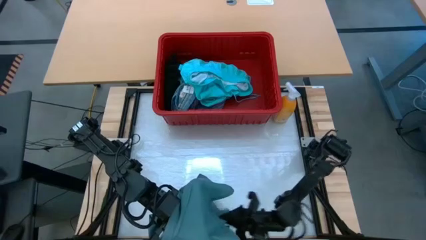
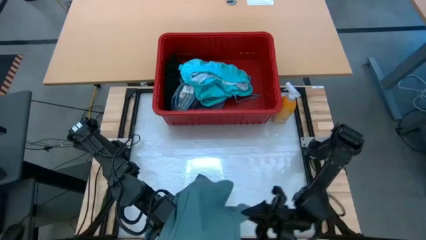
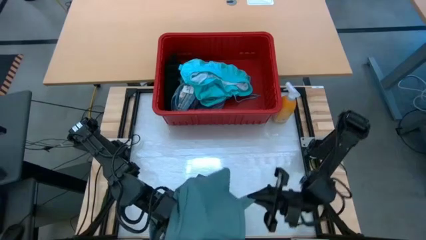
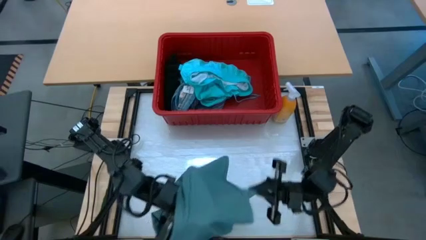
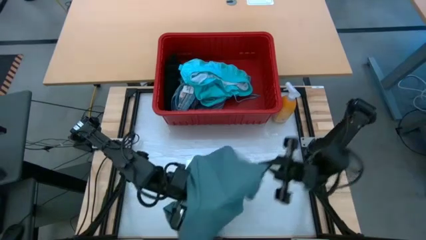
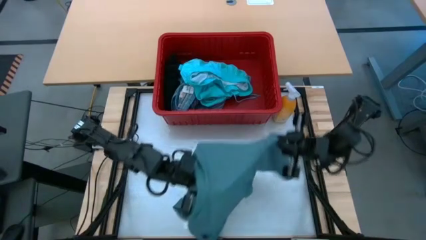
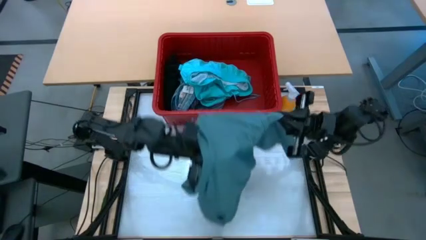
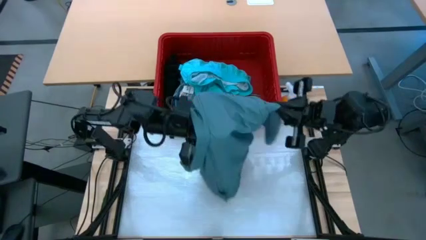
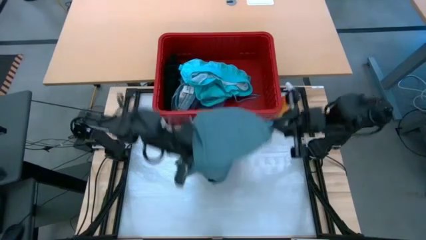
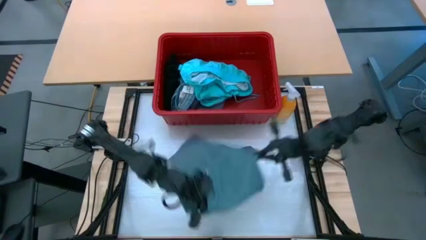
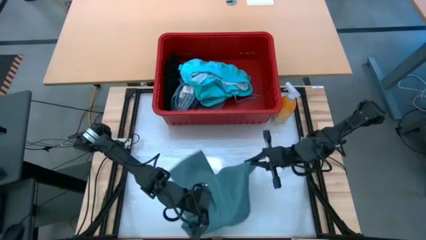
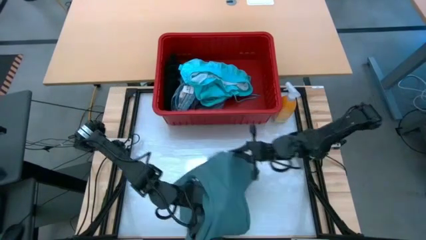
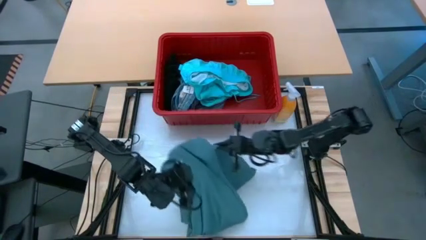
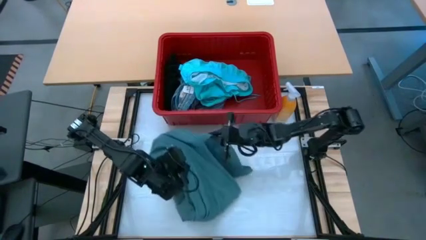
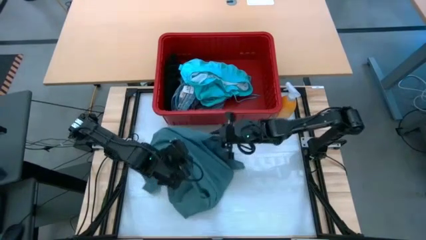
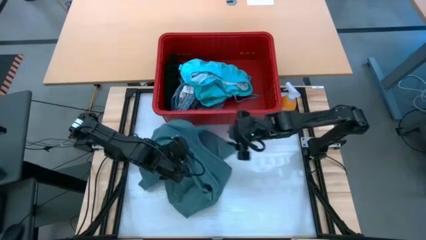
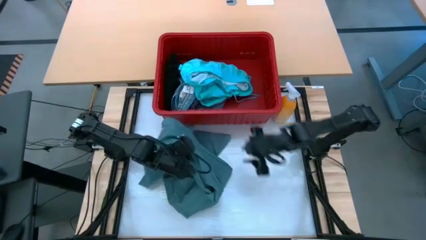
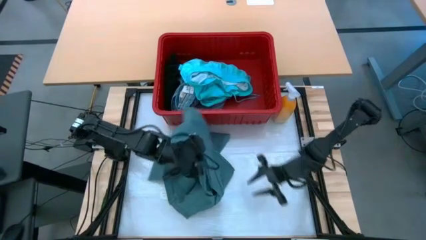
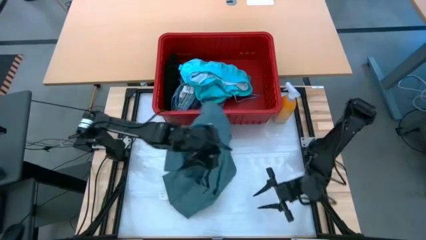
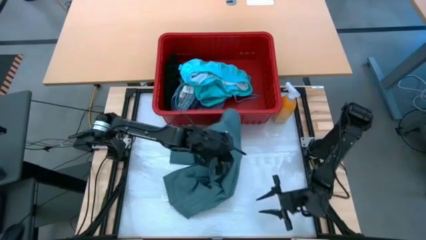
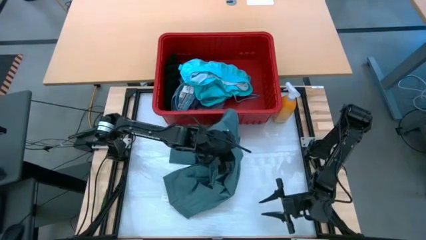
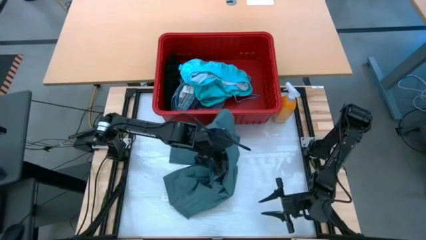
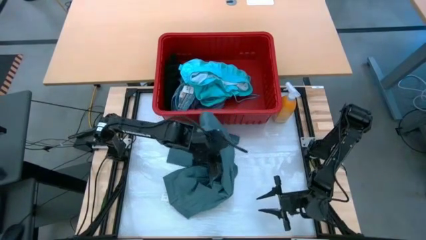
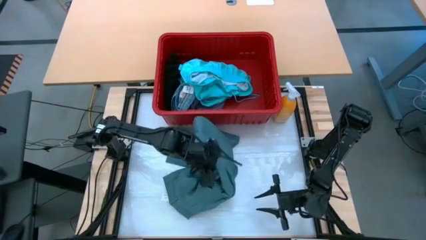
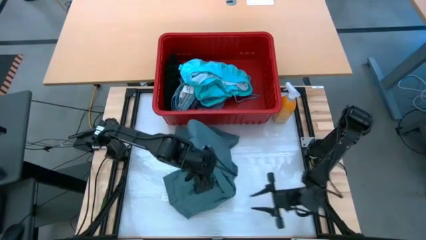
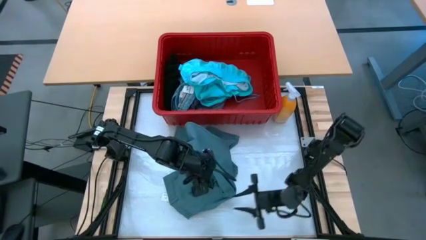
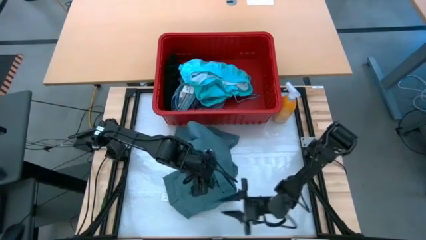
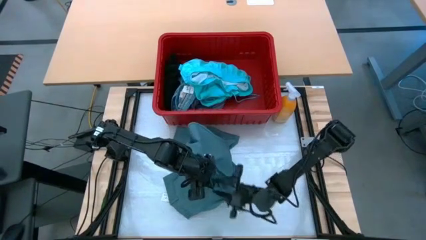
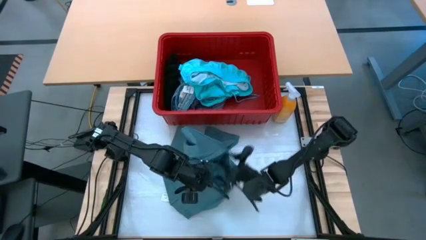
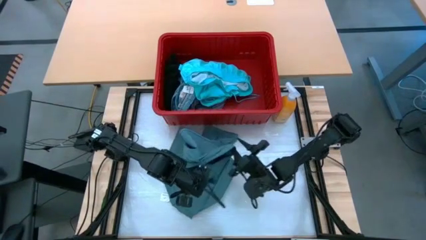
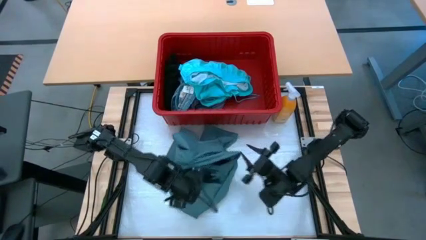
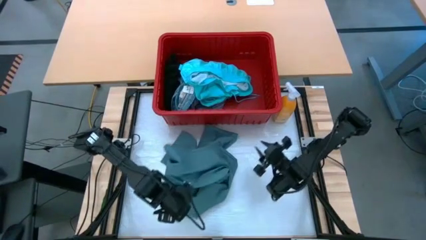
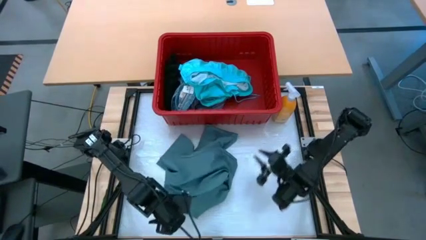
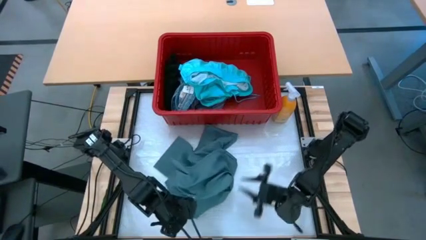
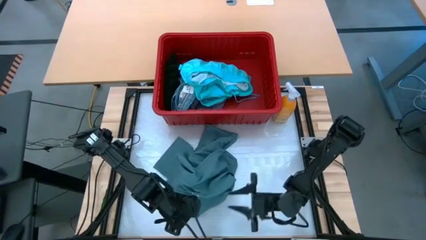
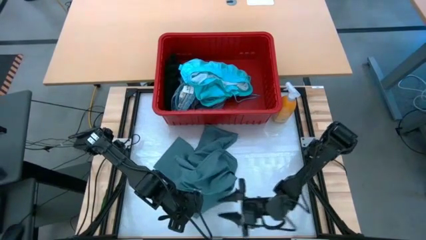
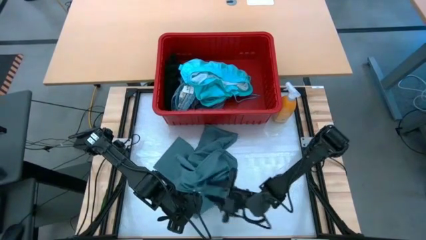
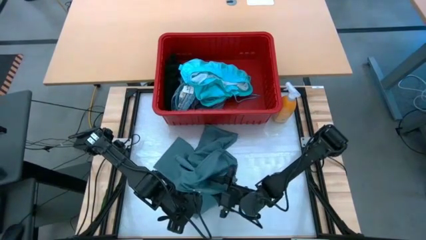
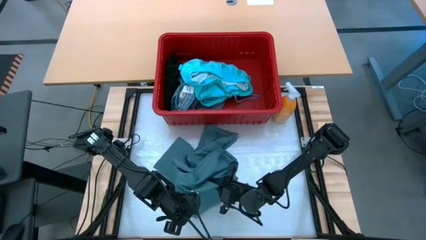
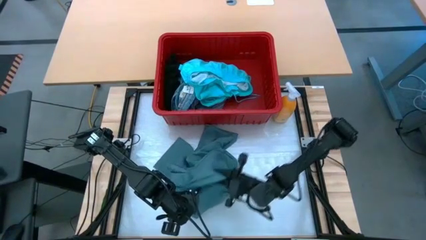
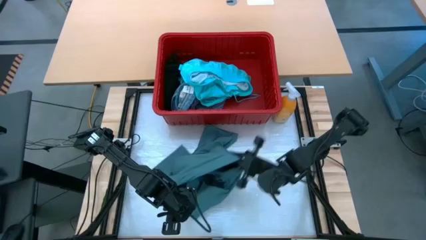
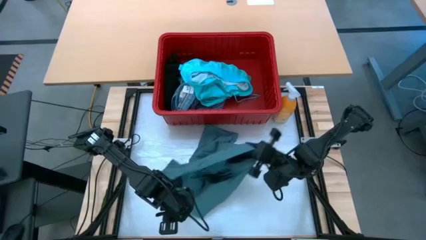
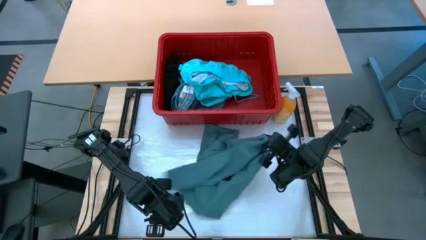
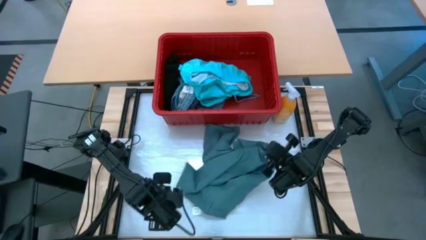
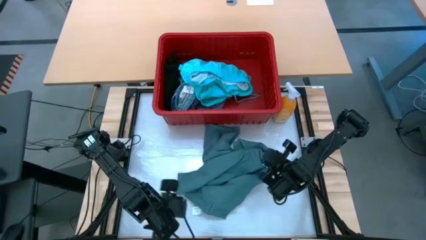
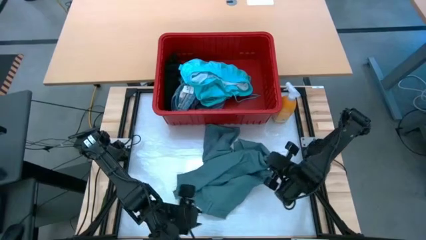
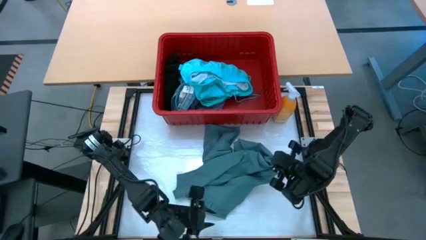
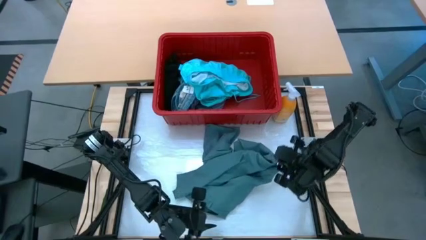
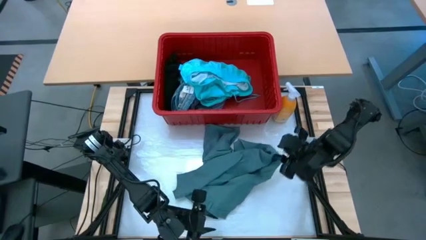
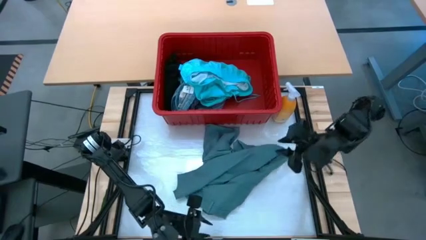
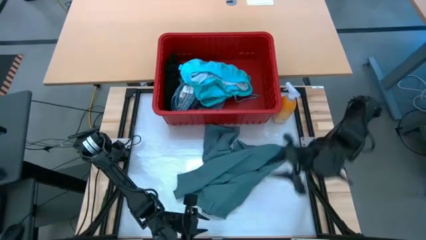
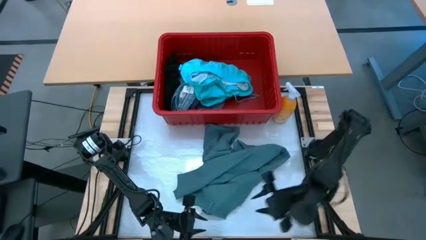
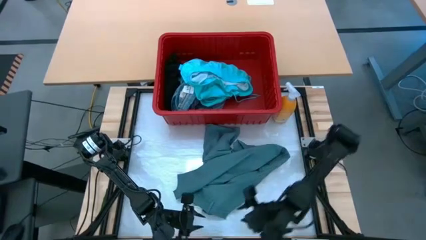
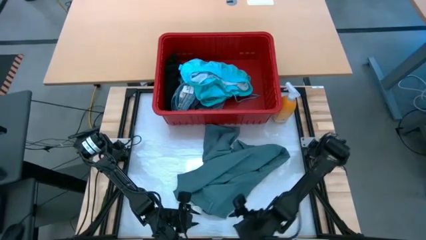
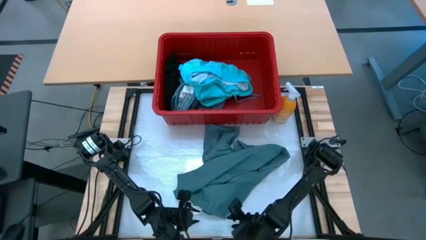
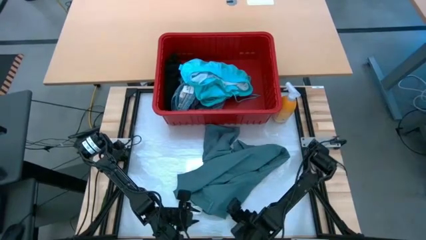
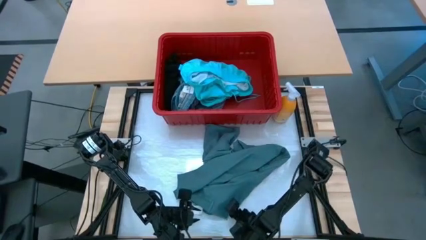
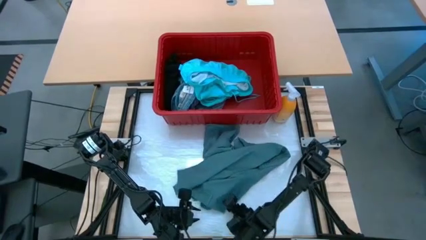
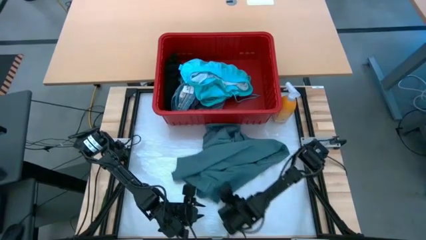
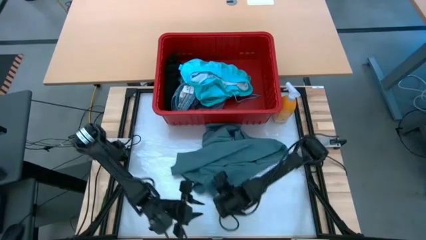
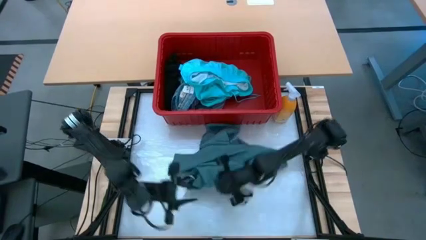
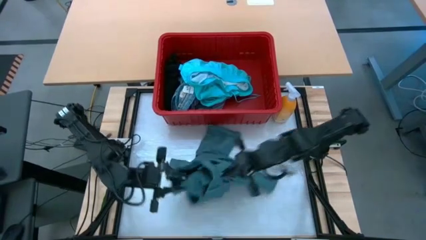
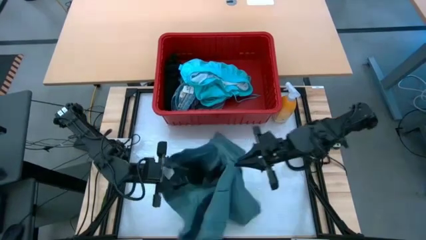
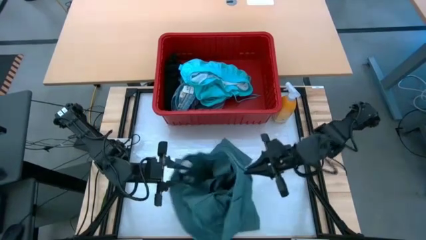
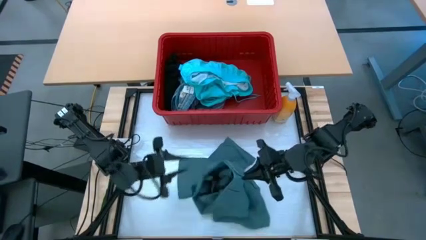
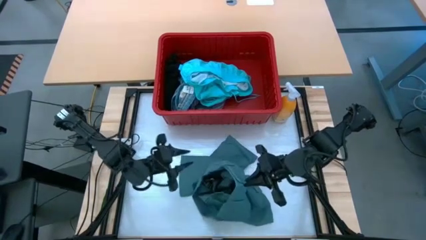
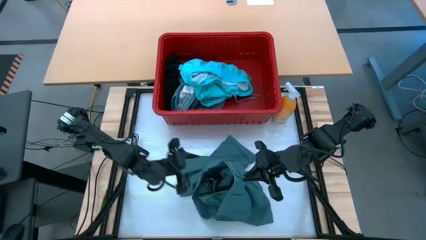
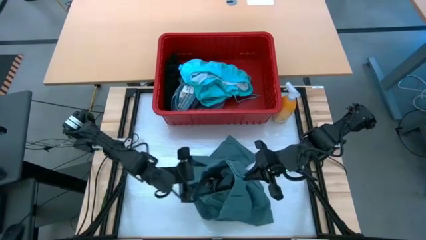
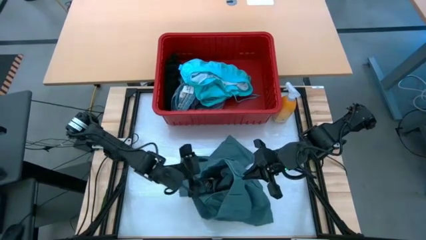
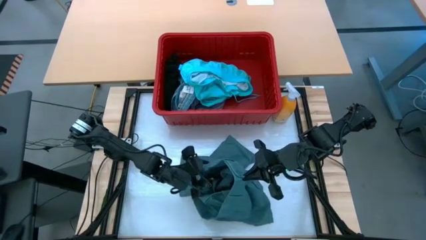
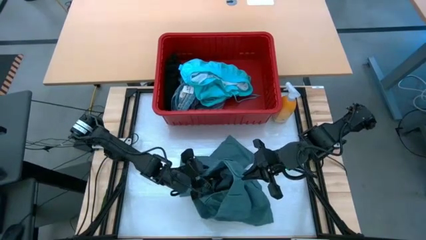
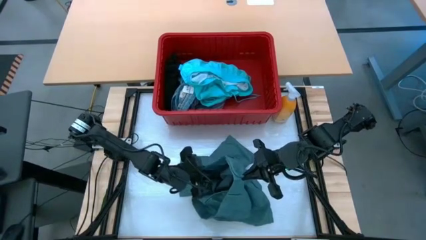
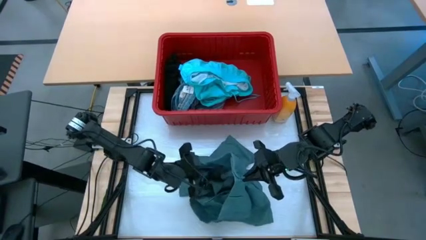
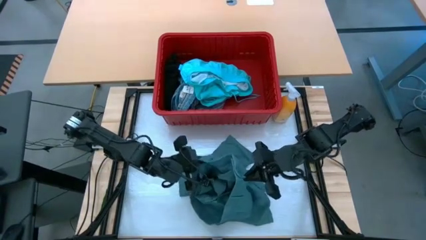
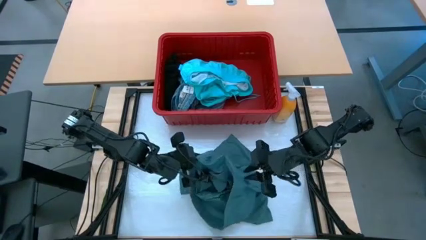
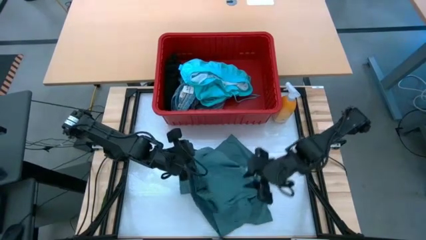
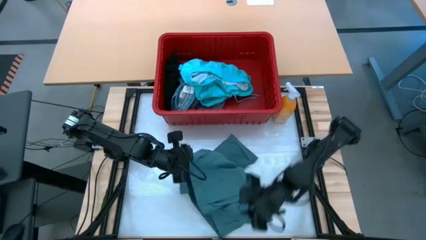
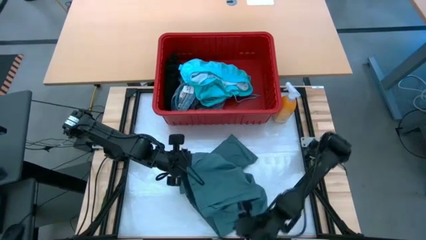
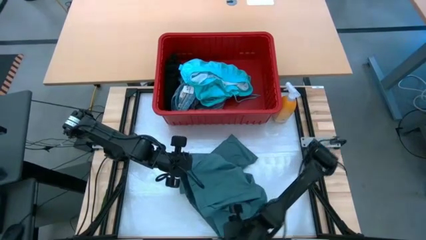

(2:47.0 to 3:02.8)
Task: Fold Laundry from Bin
Fold the light blue pants
